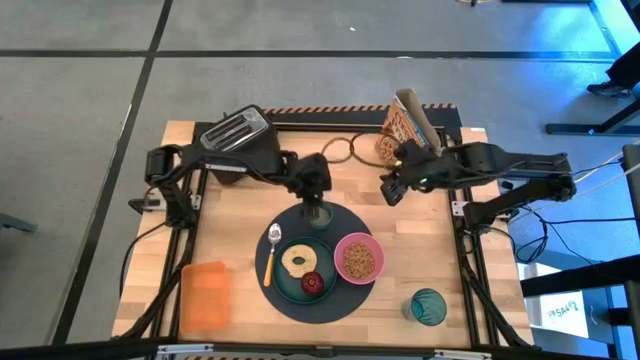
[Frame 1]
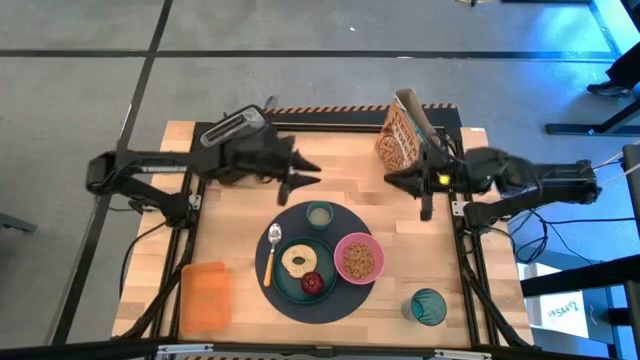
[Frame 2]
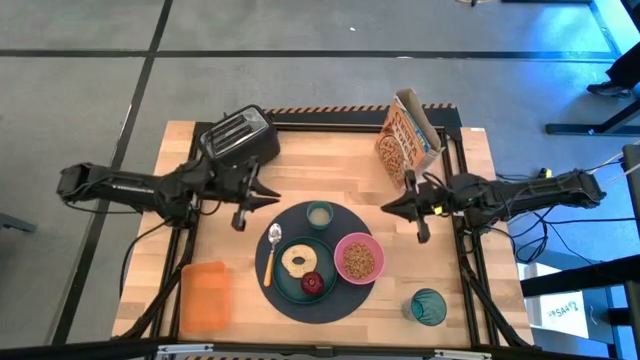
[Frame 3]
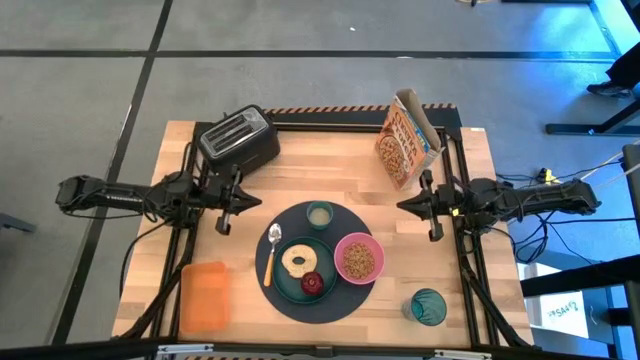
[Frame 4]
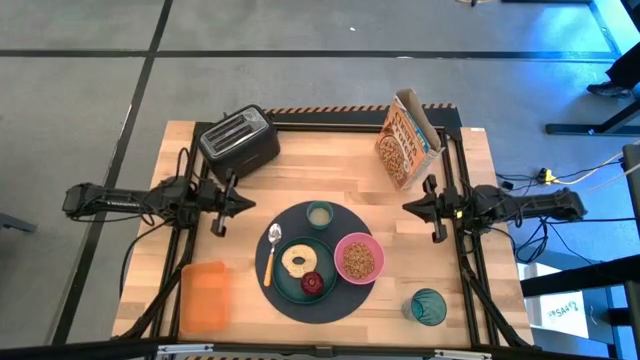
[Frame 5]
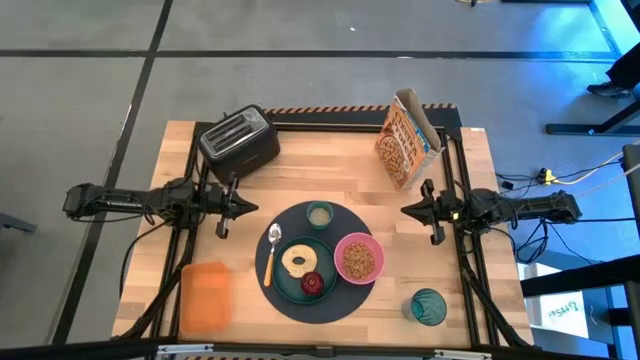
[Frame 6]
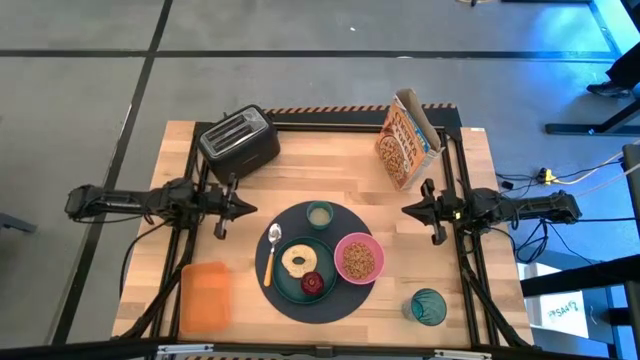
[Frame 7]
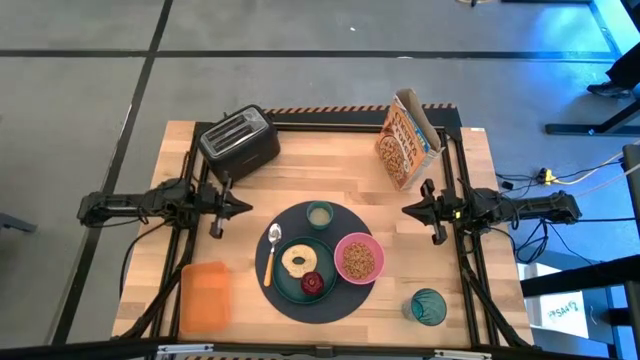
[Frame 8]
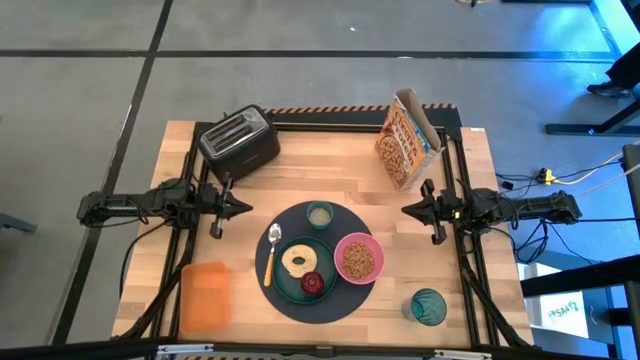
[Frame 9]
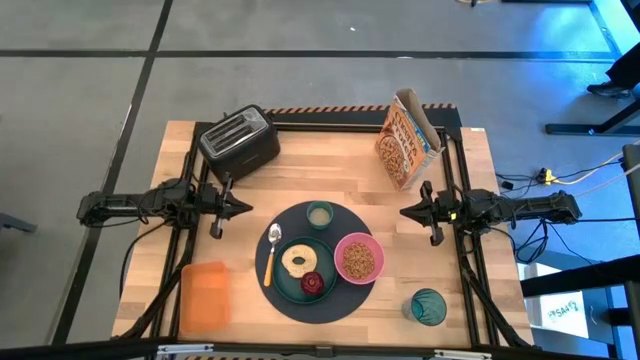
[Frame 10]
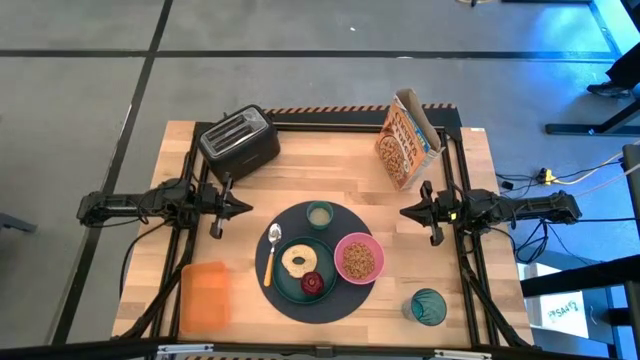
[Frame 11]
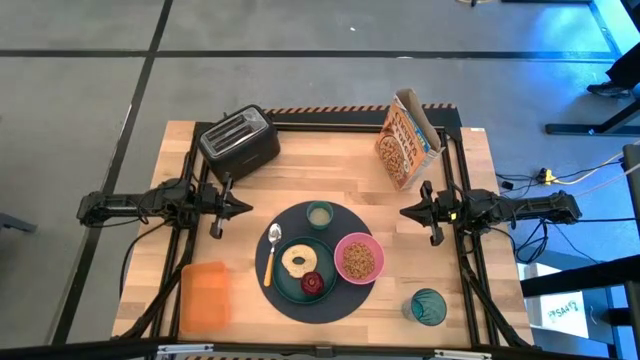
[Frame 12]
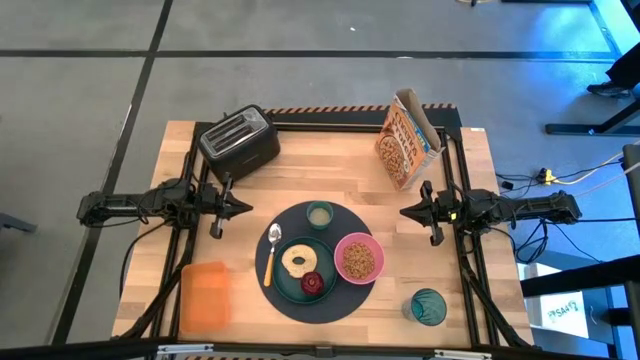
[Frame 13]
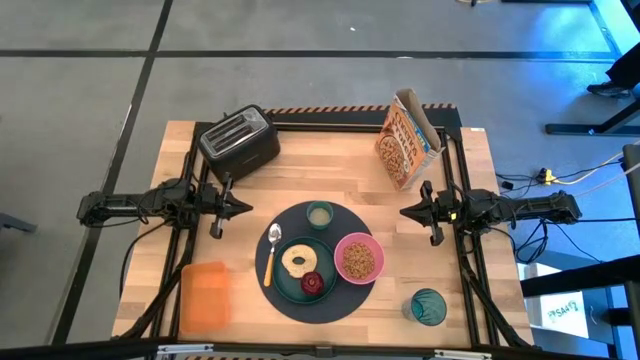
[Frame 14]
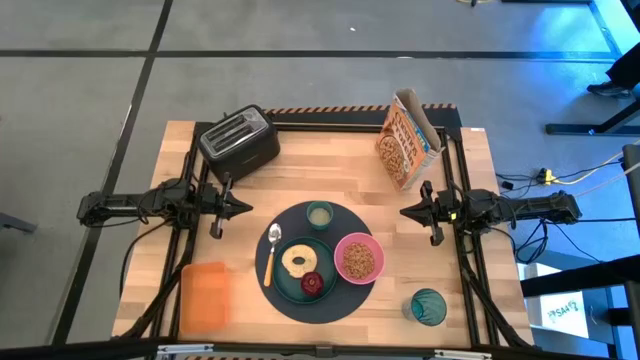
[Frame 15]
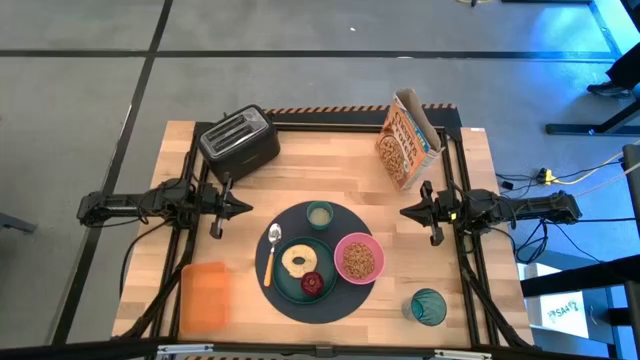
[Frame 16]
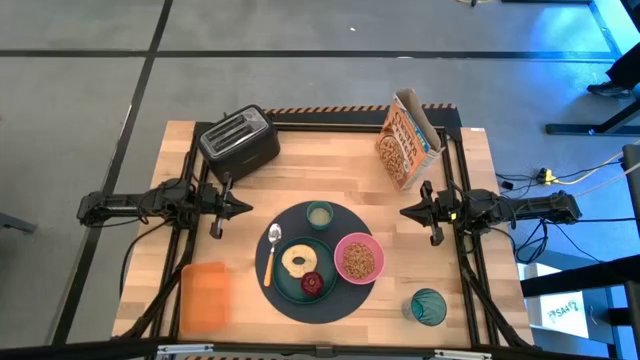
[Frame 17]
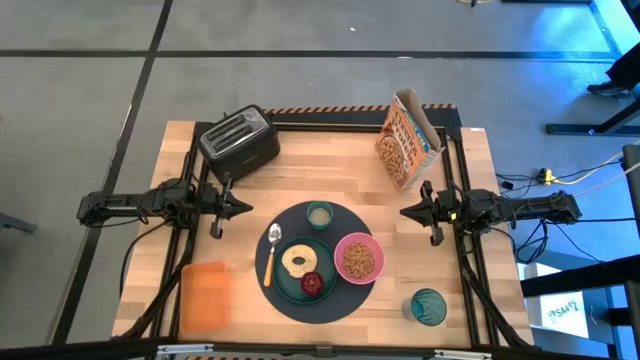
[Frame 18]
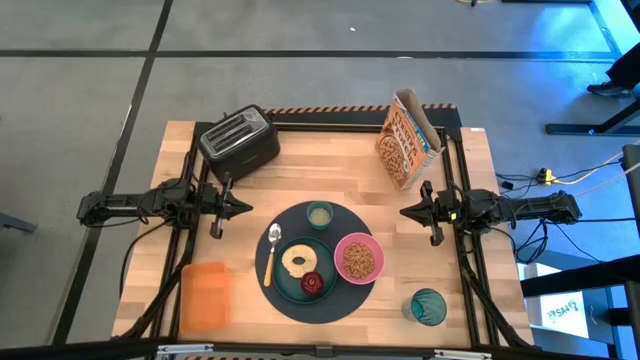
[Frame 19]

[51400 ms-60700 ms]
Task: Arrange a breakfast setting
Return to Home Position

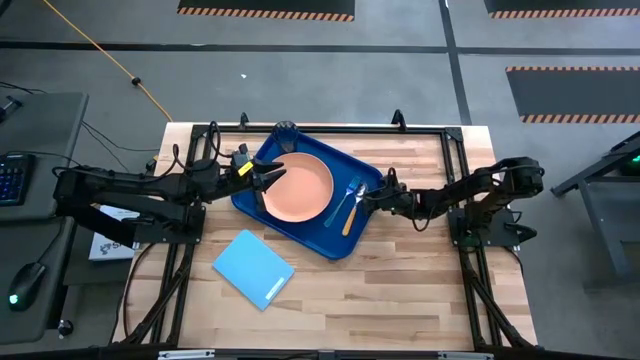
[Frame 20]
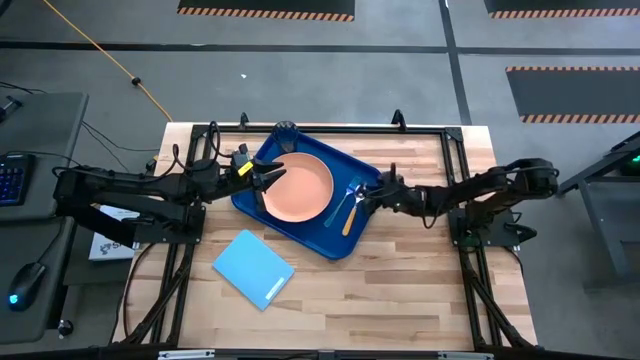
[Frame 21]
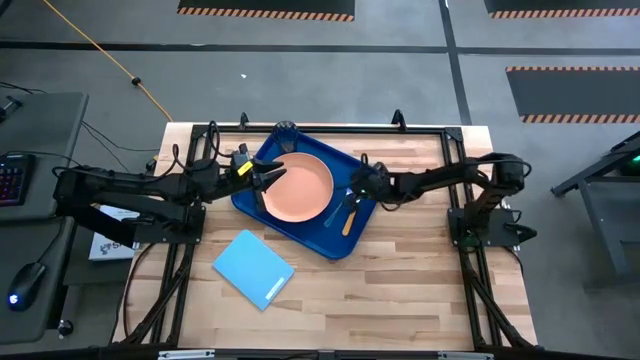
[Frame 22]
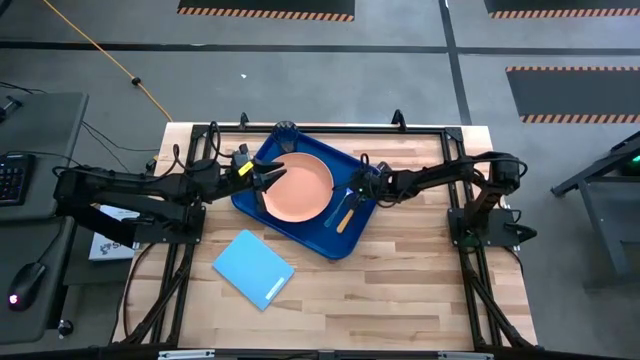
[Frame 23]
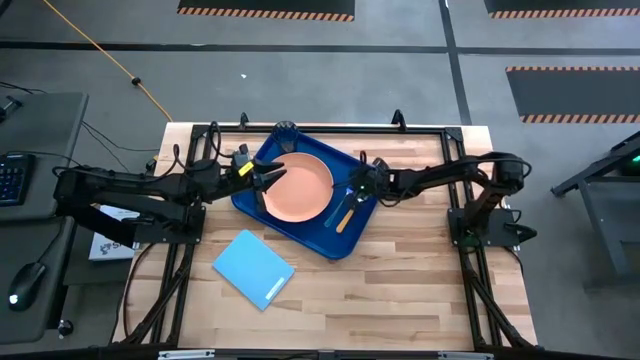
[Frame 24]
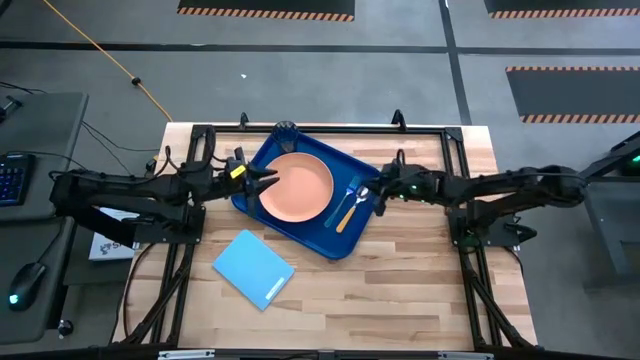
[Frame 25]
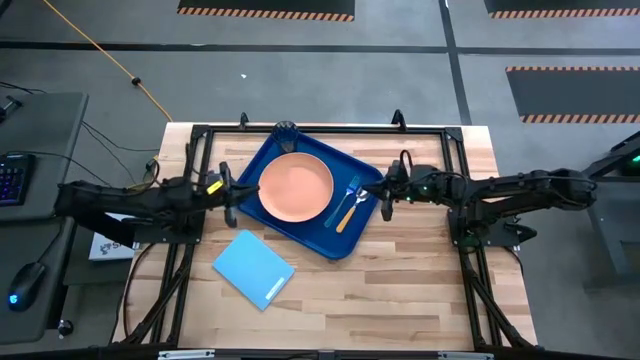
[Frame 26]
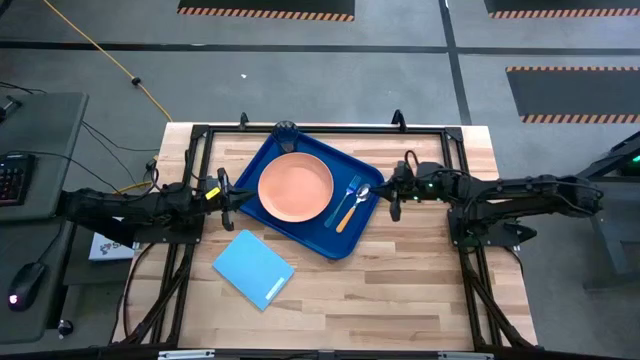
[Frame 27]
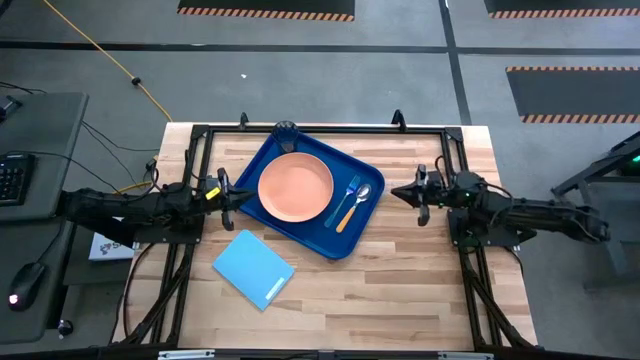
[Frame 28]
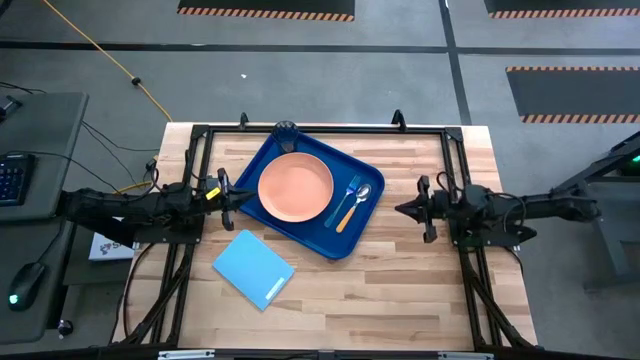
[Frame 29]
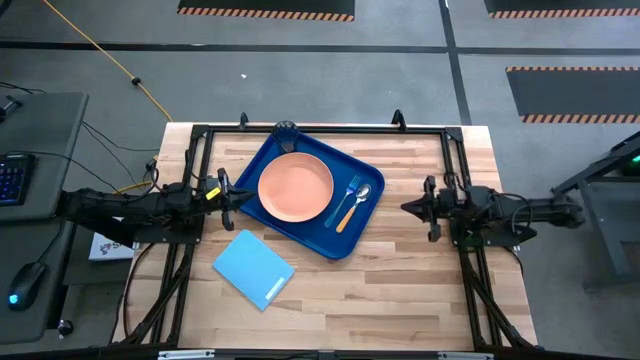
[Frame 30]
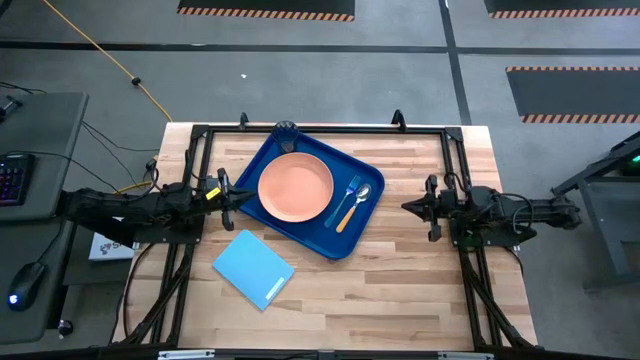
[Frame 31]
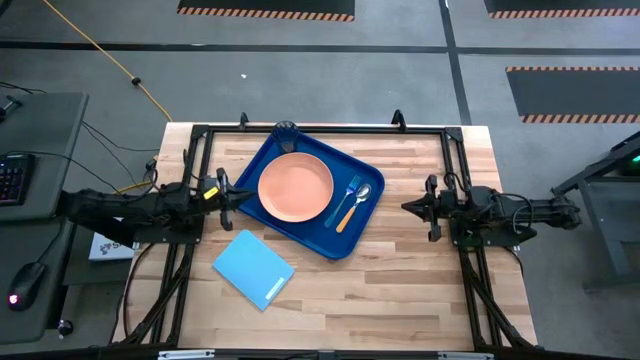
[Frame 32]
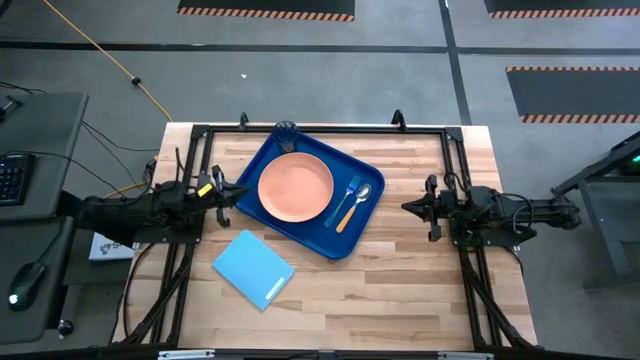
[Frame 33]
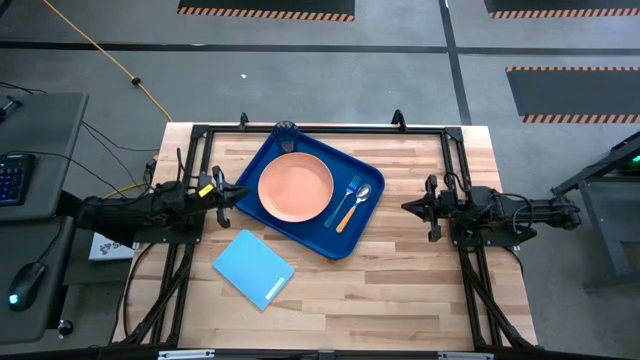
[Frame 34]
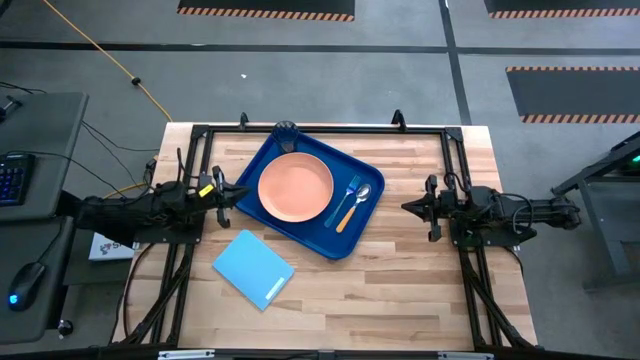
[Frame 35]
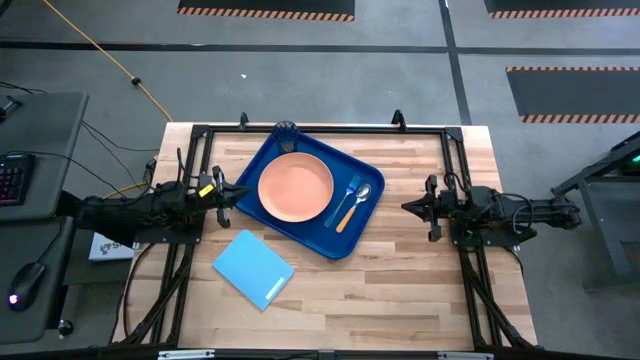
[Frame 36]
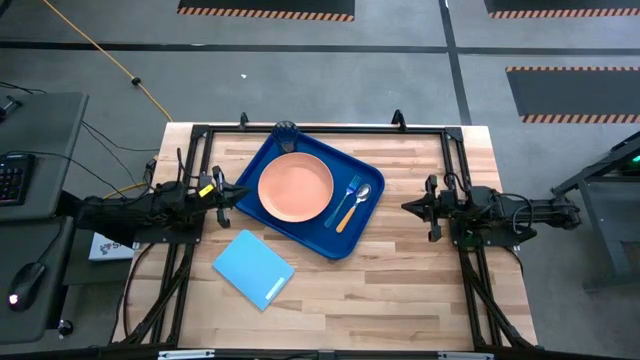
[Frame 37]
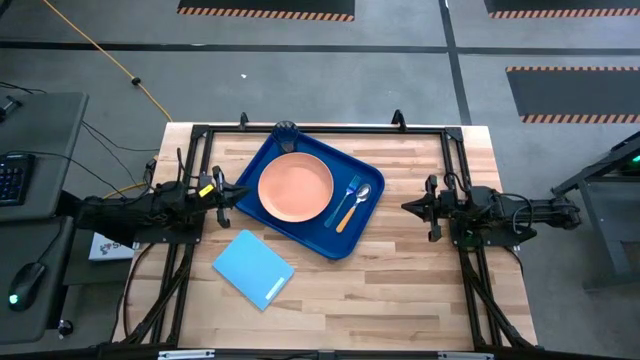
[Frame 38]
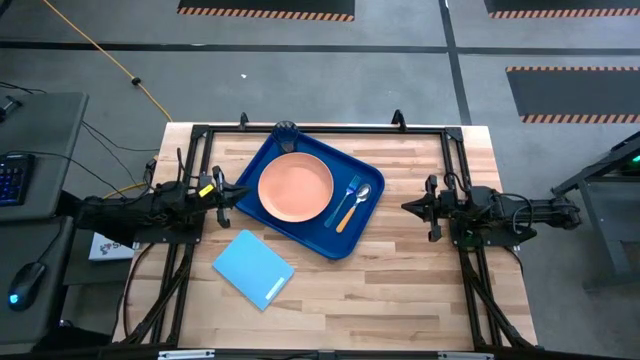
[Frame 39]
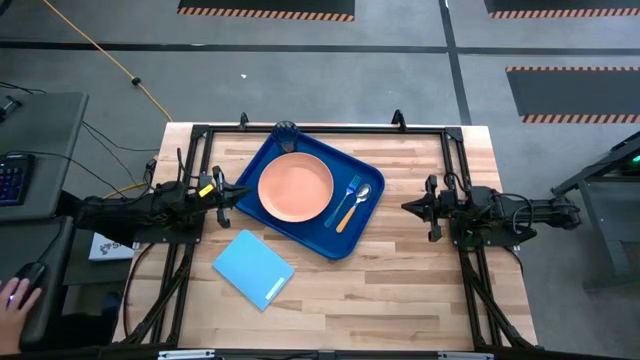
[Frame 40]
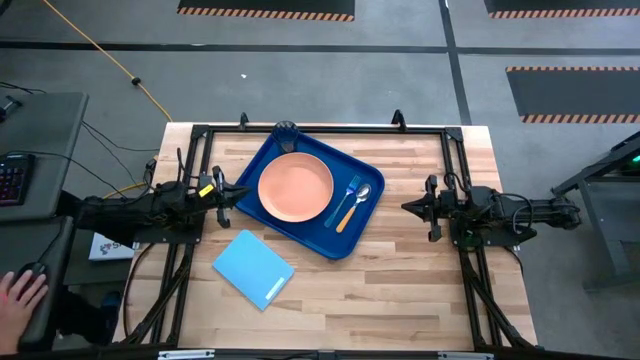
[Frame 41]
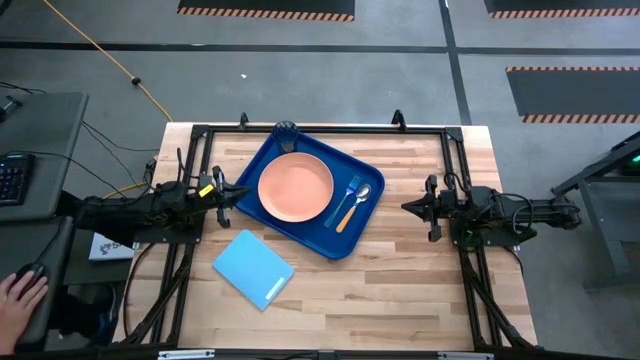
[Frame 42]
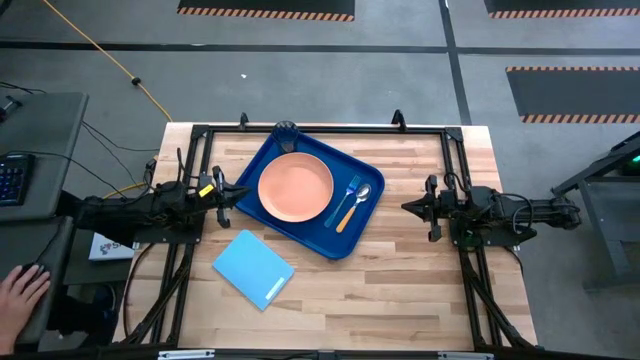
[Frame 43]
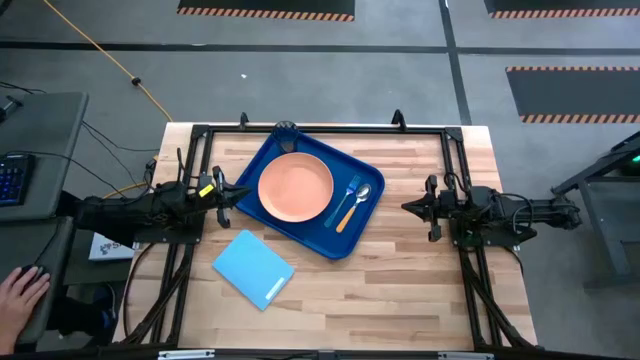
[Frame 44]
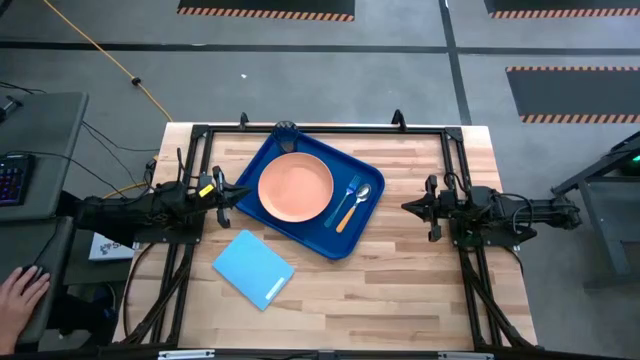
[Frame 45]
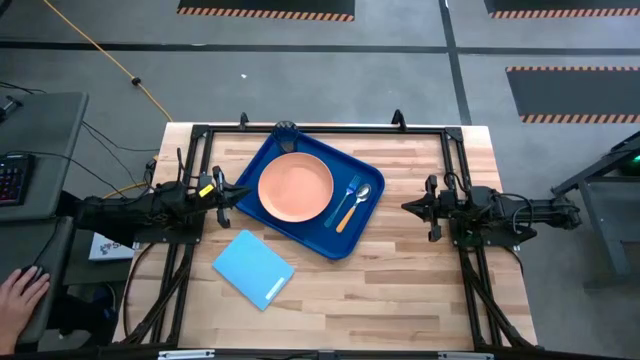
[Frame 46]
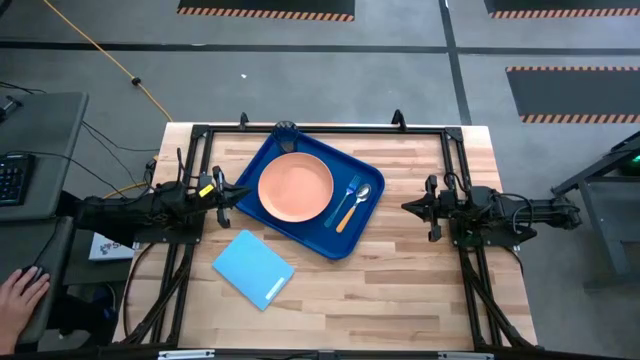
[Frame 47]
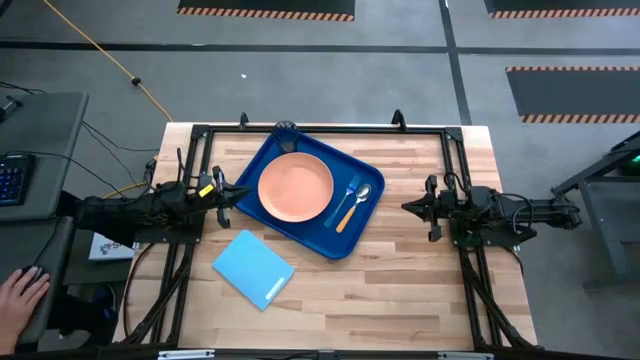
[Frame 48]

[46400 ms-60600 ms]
Task: Pick and place plate/cup/fork/spoon on tray
Return to Home Position
